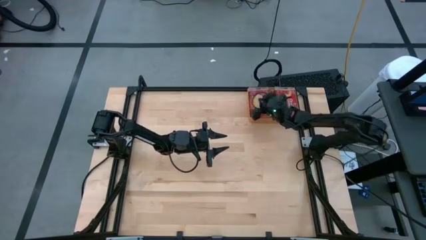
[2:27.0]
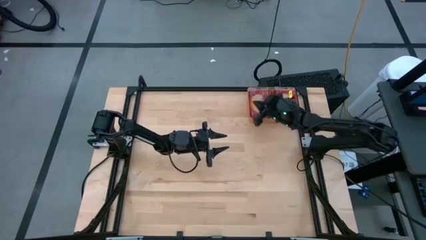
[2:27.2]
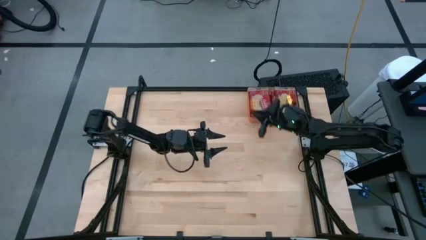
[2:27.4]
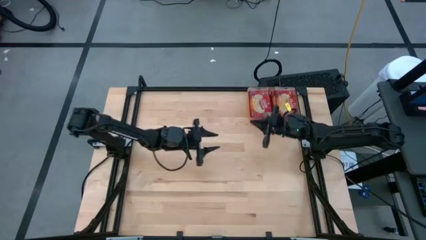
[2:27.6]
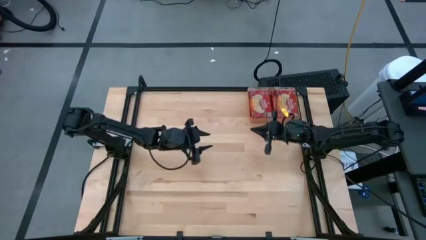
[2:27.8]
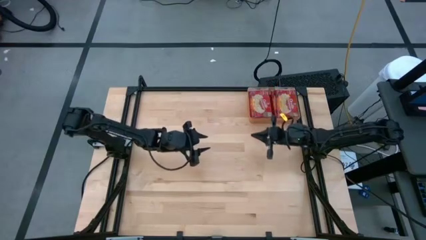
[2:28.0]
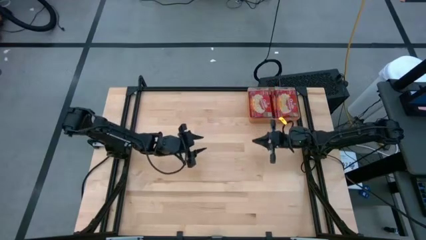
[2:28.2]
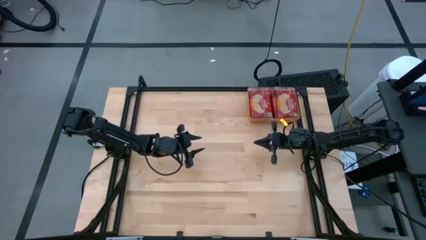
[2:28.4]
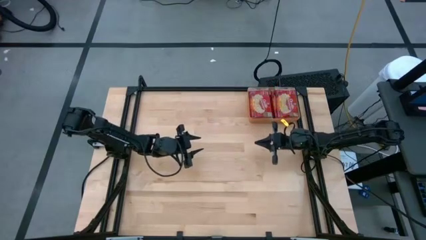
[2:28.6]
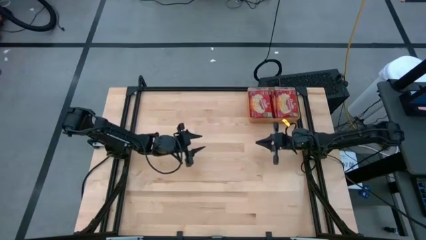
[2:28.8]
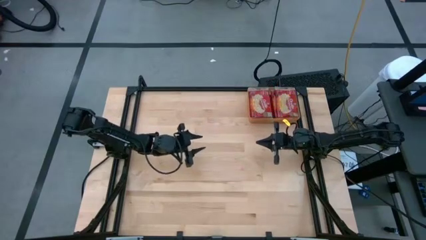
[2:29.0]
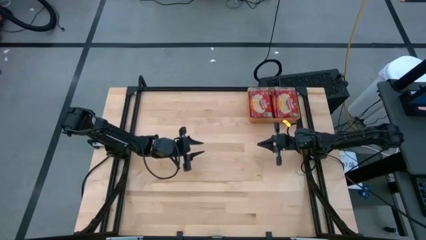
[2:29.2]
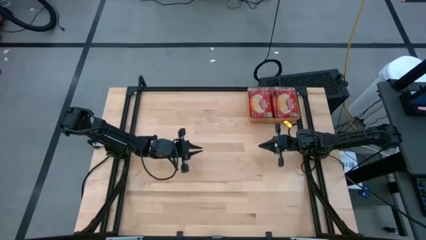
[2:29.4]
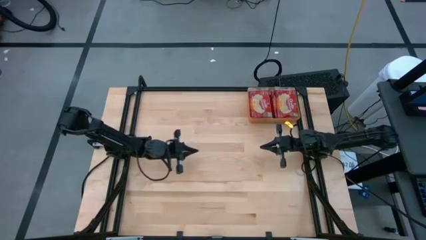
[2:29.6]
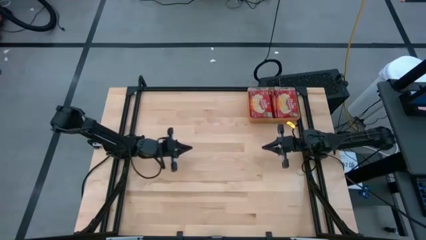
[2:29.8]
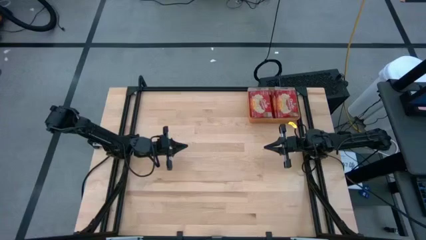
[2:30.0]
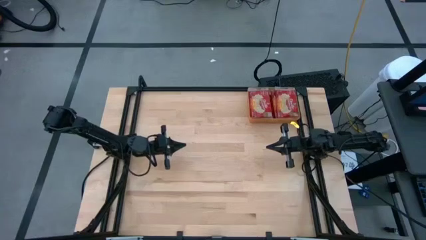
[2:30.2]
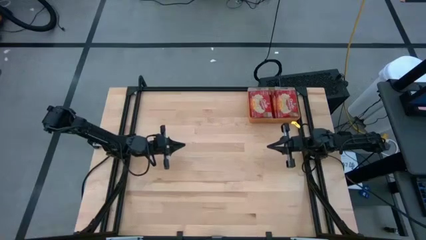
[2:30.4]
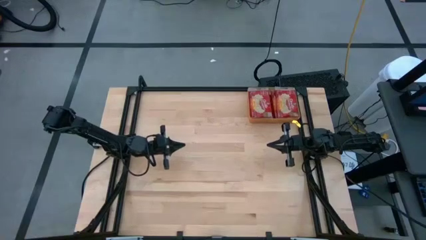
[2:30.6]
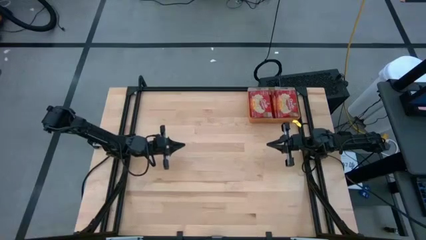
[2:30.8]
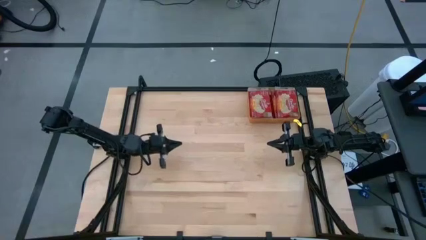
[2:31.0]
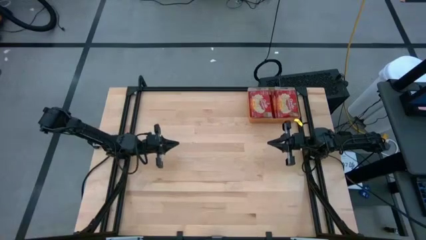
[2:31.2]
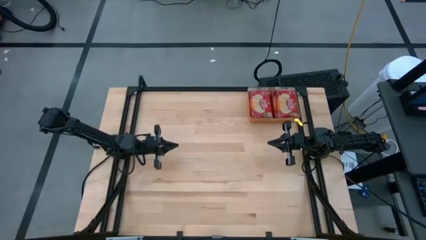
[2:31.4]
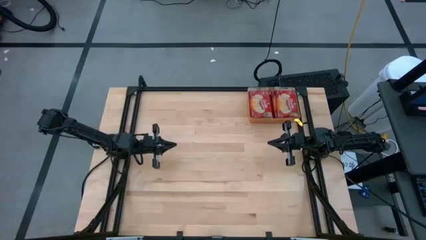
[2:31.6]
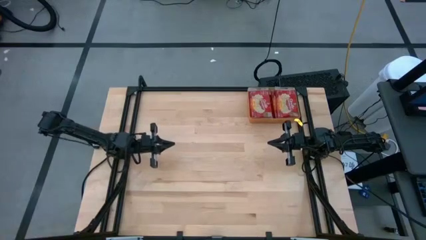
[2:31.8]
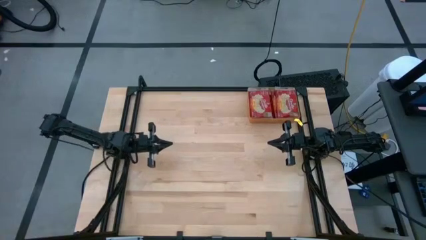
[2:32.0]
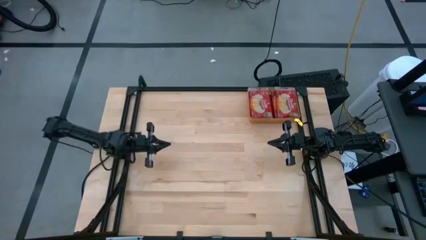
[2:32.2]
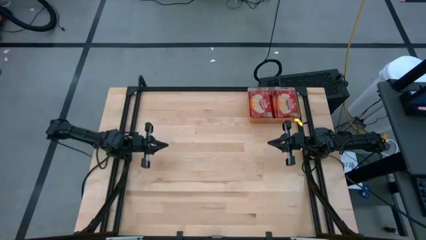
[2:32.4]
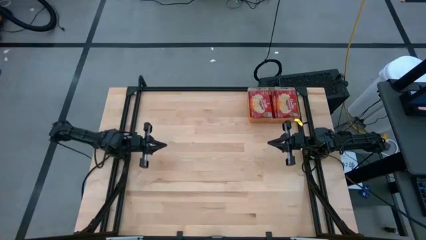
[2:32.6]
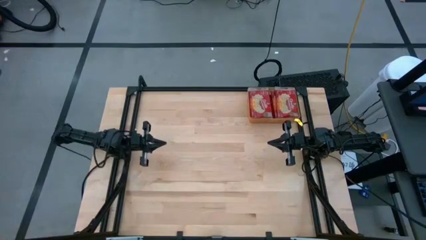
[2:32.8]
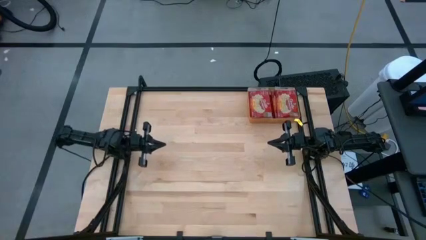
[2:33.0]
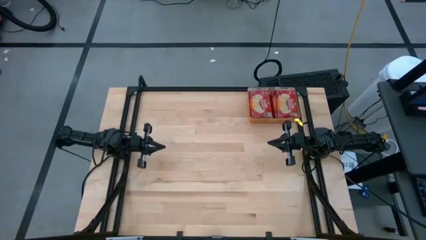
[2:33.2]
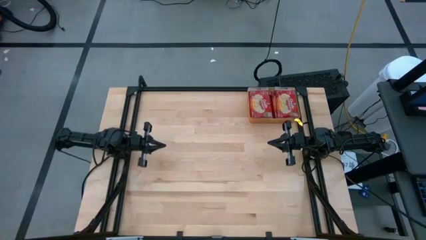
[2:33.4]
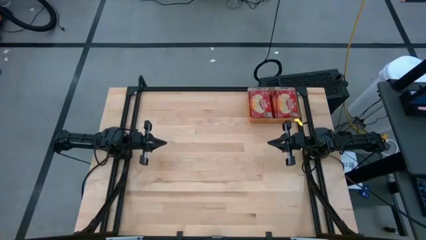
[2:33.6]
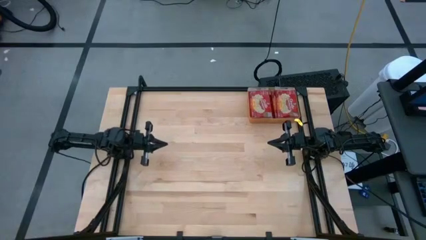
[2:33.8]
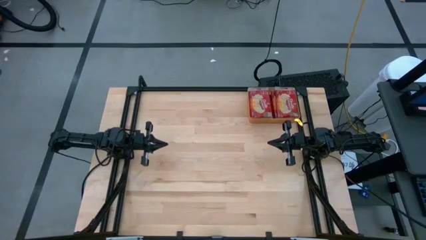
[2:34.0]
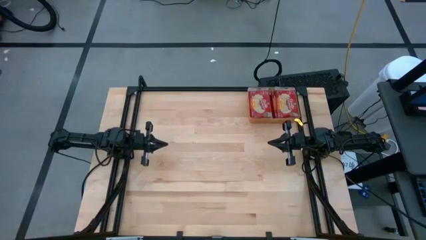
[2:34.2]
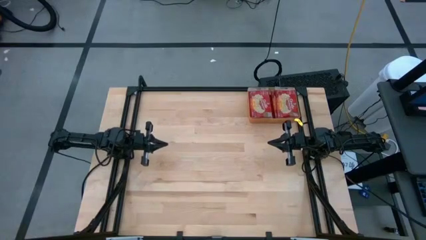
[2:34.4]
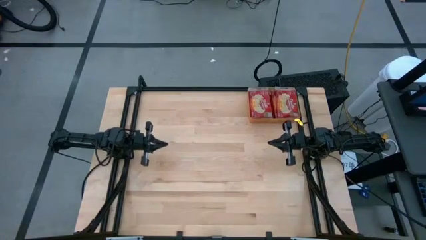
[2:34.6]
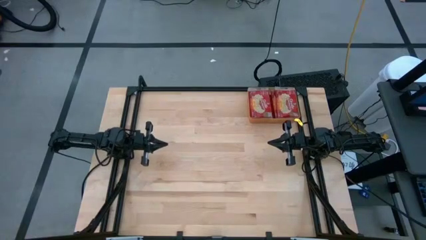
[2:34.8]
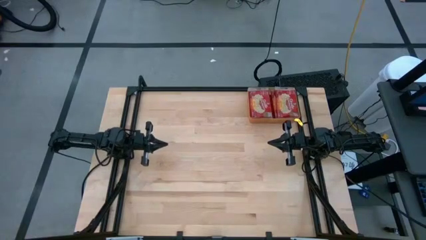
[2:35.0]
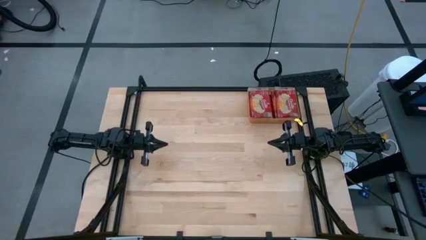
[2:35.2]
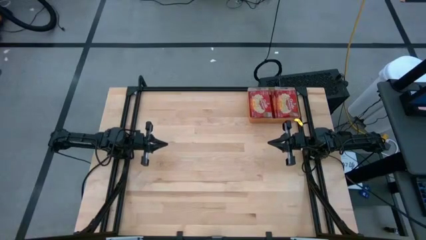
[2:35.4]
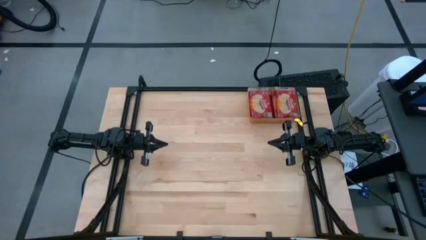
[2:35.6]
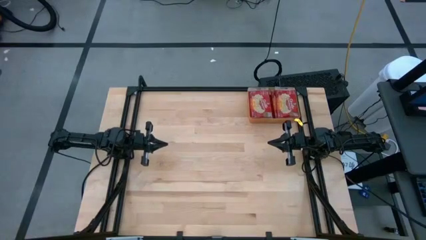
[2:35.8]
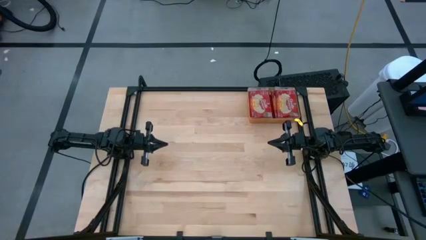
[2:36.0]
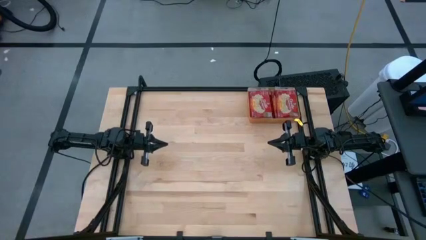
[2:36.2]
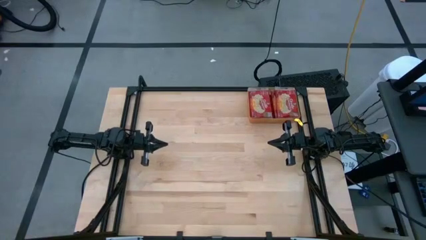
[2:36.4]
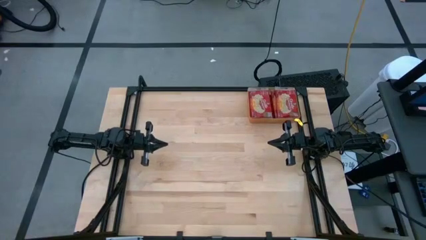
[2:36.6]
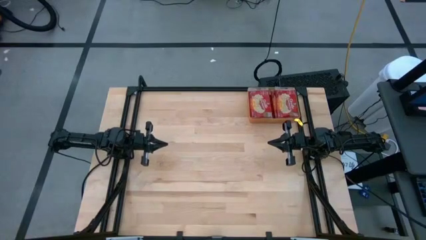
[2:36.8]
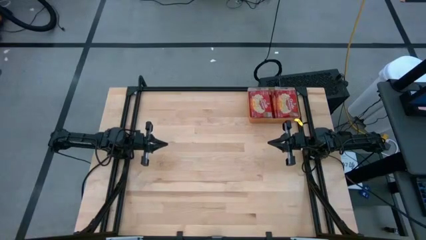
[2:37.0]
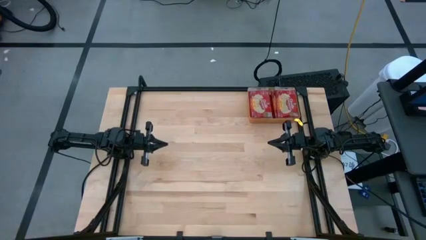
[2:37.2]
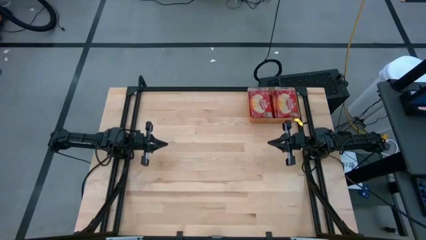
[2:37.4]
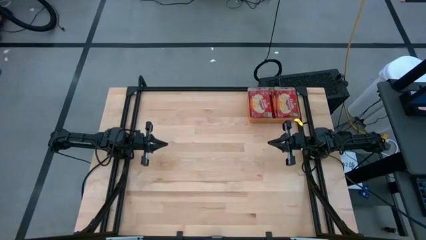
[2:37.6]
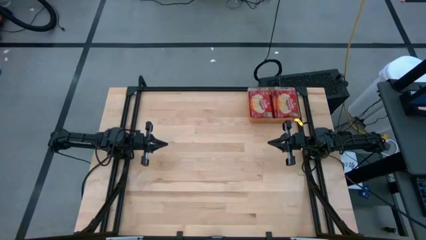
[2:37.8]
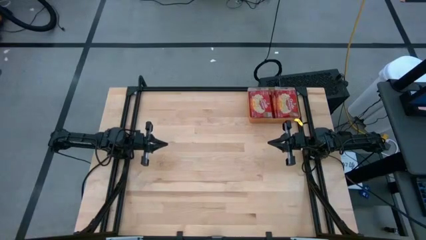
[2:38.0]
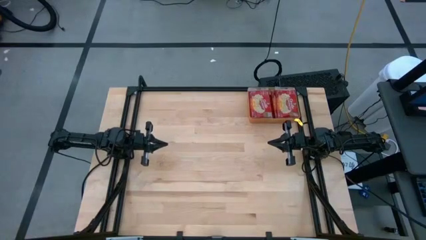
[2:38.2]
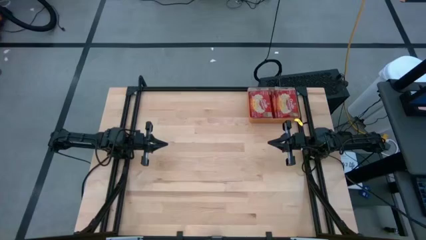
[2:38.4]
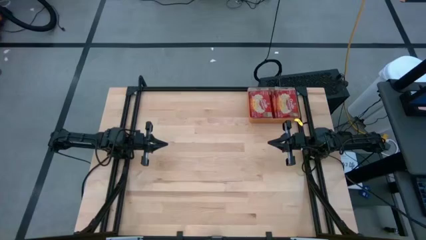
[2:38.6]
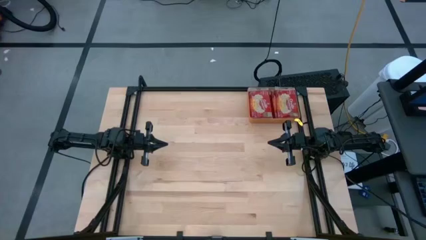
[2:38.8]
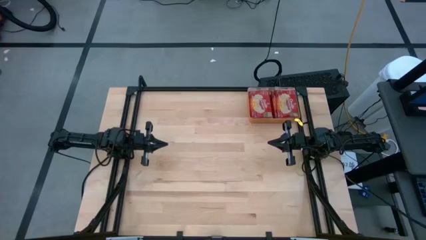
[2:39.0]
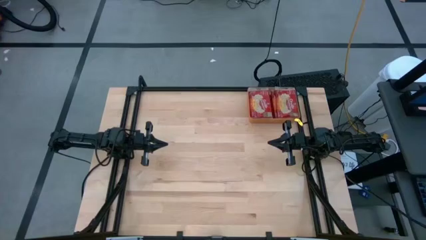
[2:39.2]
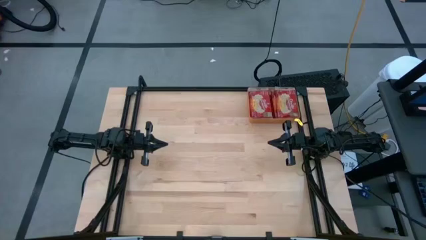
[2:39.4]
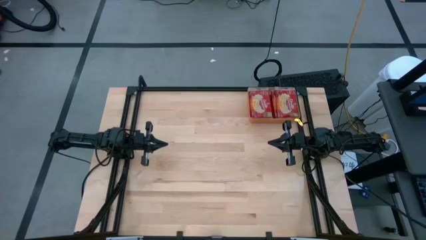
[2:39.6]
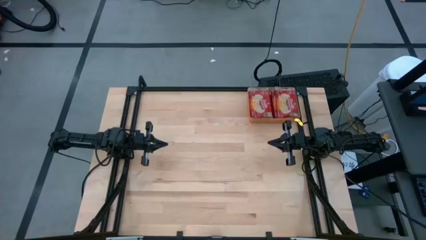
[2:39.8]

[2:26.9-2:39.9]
Task: Sort popcorn bags into baskets
Return to Home Position

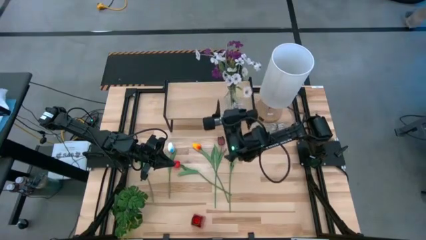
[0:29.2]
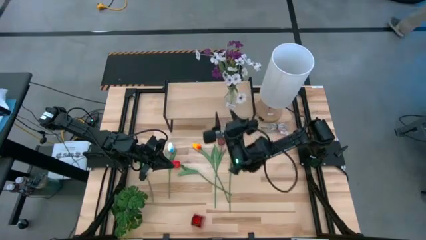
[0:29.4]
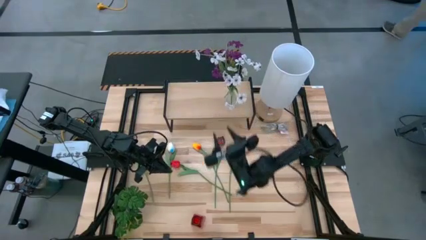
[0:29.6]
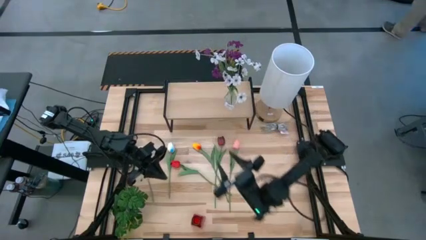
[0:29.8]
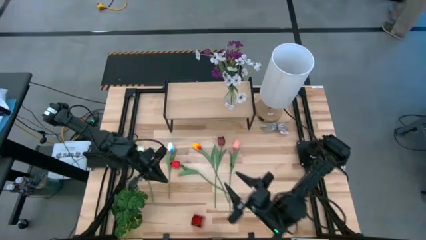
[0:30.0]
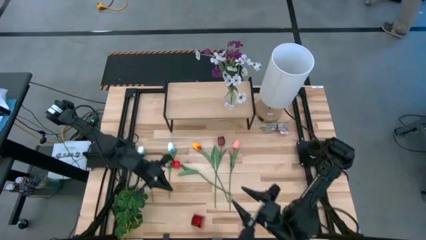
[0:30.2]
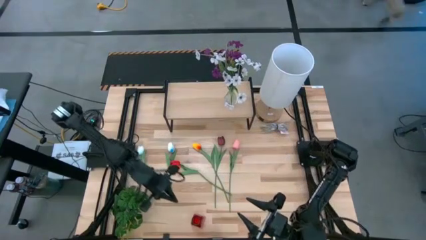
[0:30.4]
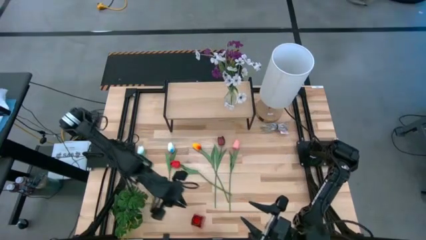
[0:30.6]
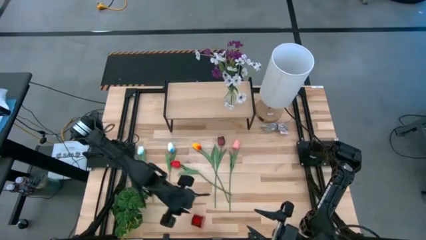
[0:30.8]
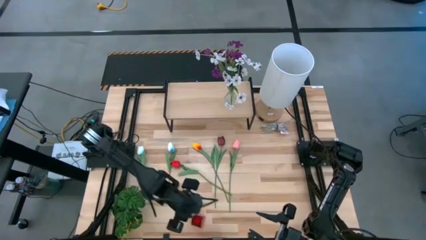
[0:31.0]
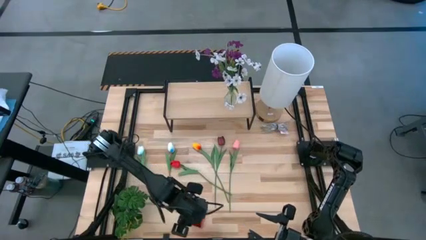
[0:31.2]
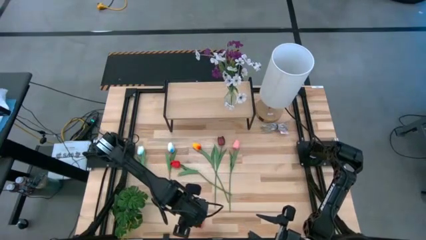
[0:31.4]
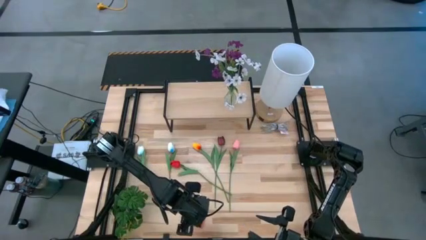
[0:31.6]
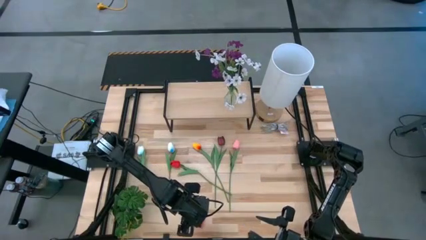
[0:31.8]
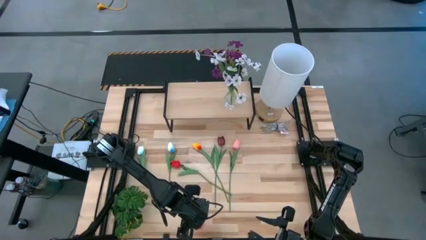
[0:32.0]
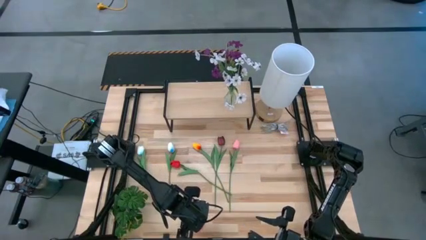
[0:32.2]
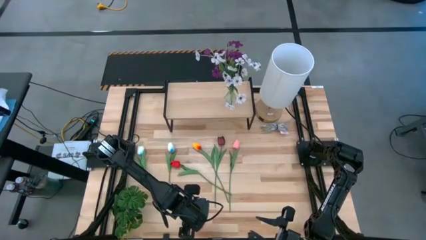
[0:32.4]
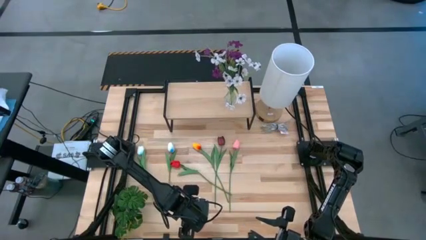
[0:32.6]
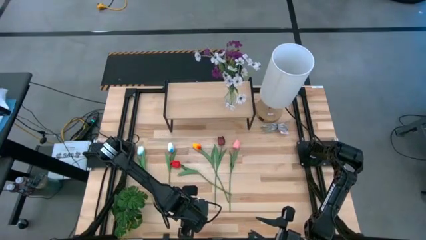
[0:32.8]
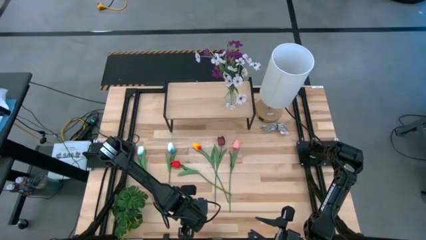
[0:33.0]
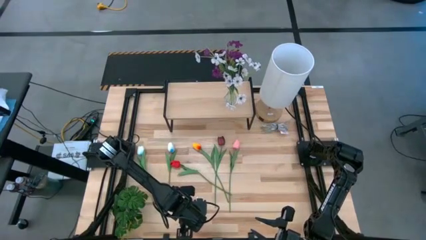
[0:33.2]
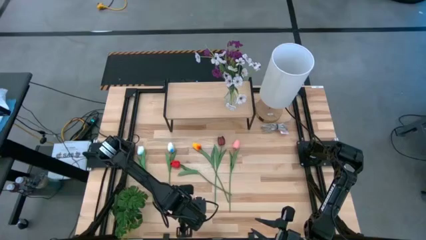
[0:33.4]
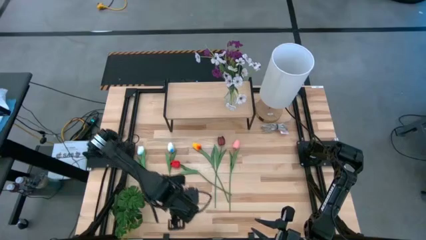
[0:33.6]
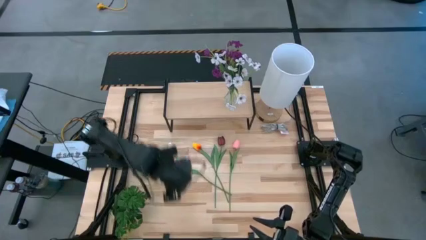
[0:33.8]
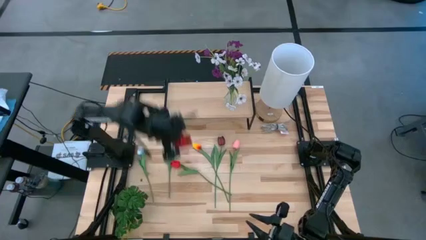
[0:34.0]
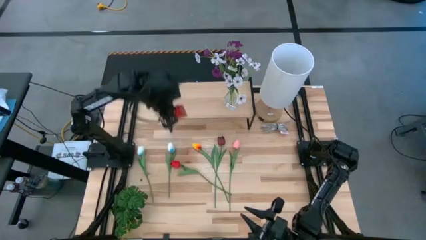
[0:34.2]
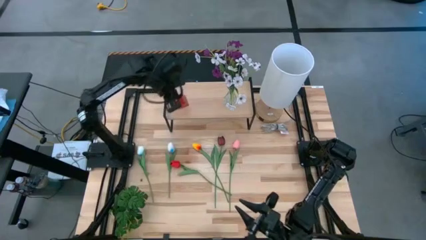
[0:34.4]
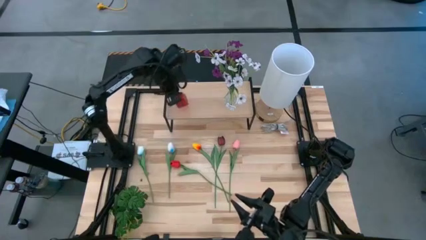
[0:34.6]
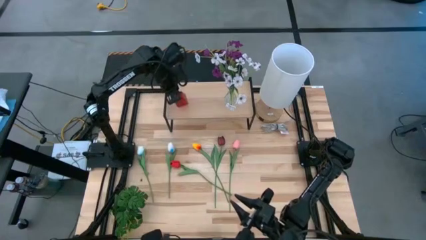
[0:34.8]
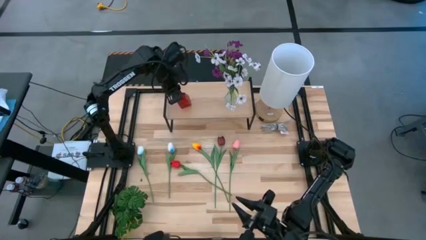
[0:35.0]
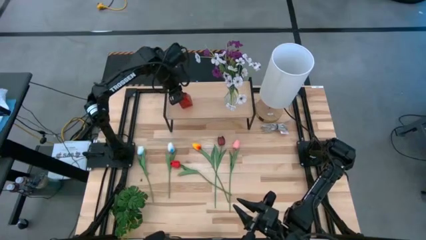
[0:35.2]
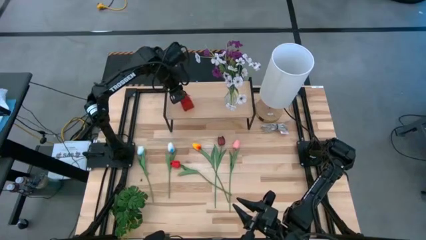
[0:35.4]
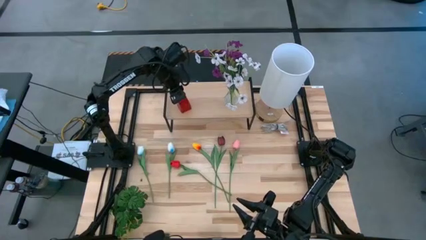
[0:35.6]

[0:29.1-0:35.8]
Task: Pick and place flowers into a vace then onto a shelf
Put the red vase on the shelf
